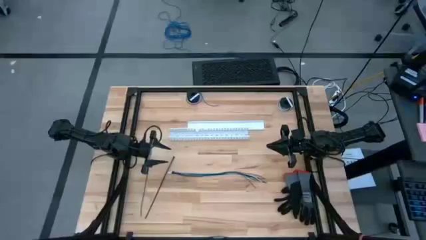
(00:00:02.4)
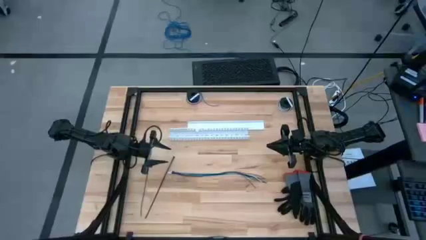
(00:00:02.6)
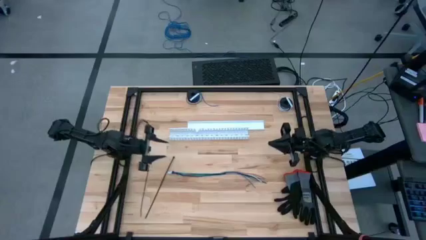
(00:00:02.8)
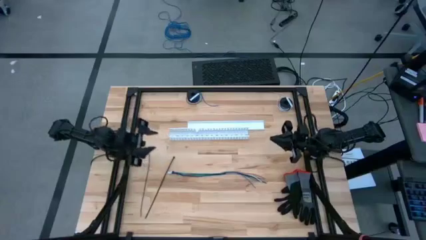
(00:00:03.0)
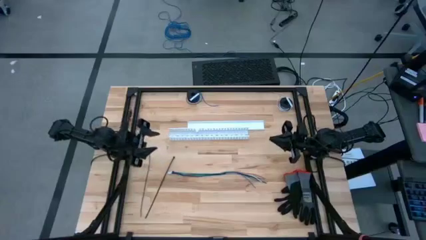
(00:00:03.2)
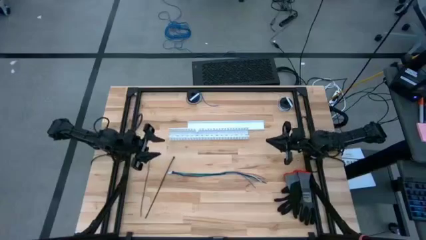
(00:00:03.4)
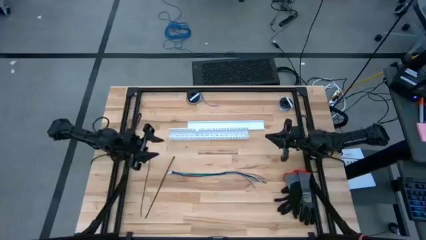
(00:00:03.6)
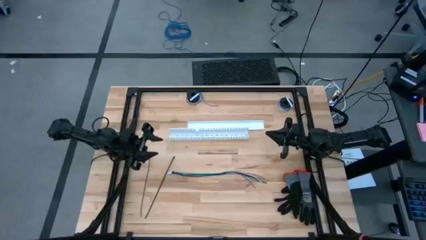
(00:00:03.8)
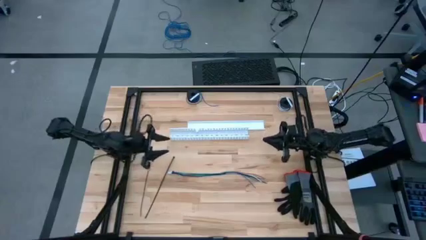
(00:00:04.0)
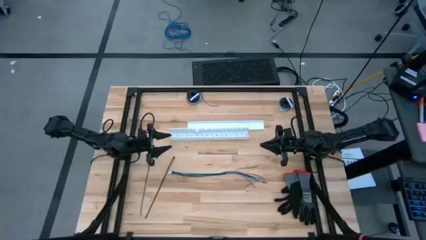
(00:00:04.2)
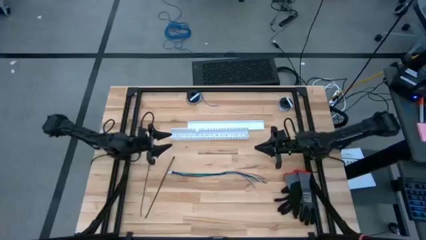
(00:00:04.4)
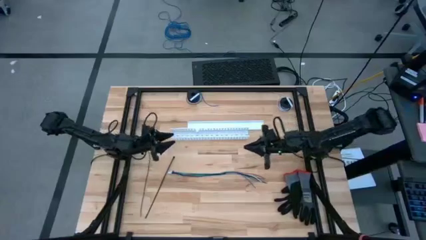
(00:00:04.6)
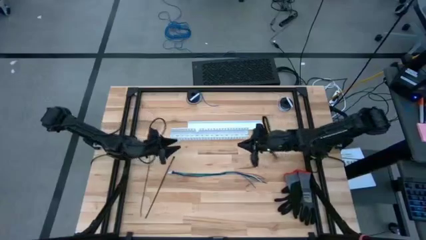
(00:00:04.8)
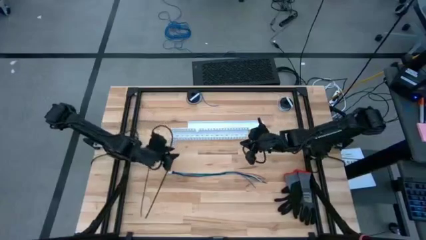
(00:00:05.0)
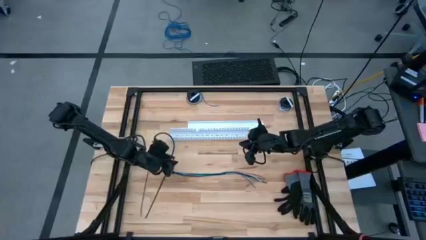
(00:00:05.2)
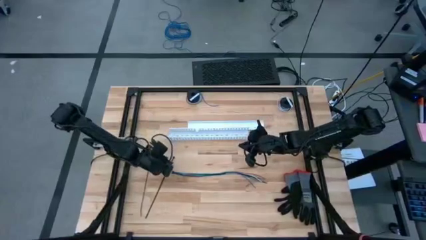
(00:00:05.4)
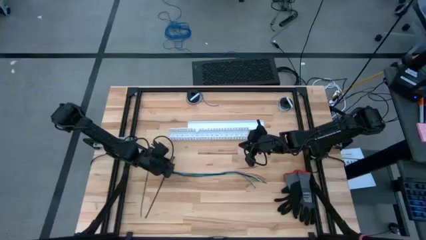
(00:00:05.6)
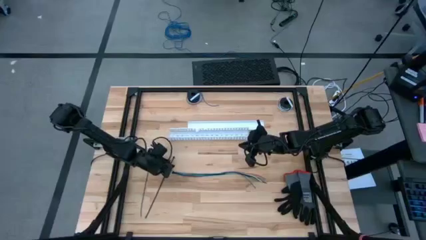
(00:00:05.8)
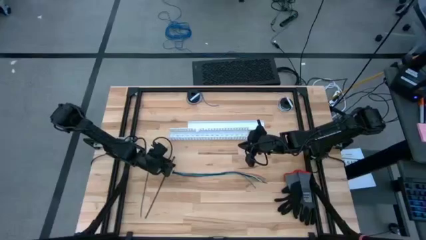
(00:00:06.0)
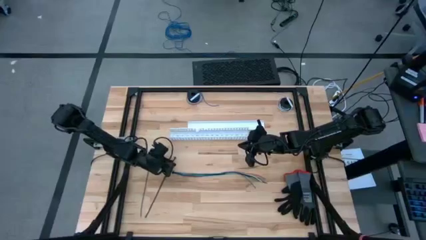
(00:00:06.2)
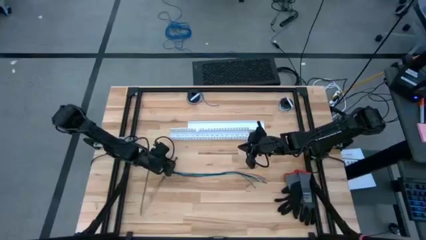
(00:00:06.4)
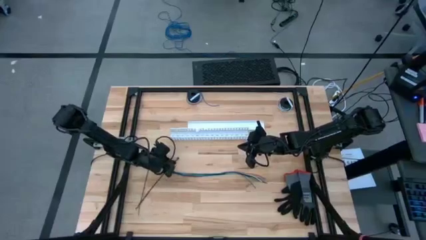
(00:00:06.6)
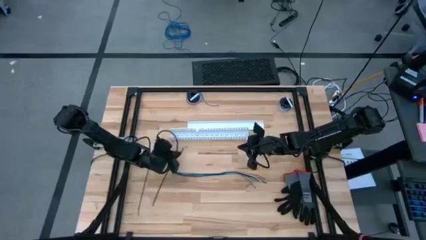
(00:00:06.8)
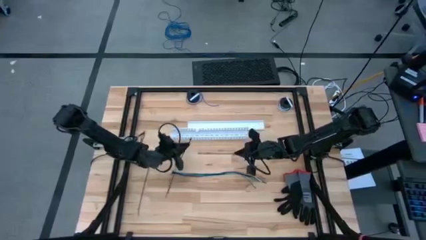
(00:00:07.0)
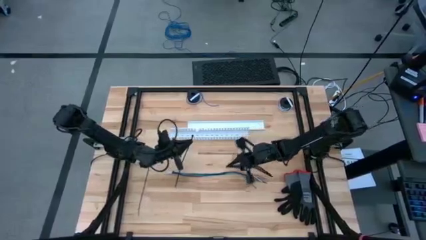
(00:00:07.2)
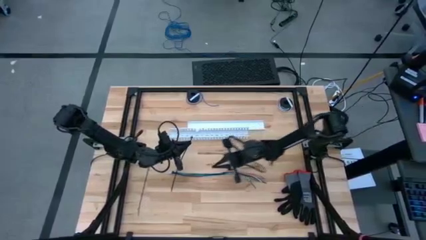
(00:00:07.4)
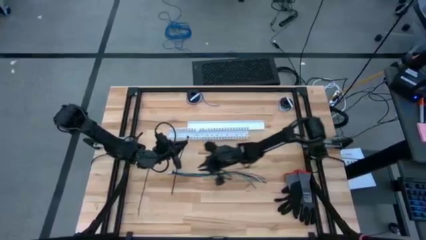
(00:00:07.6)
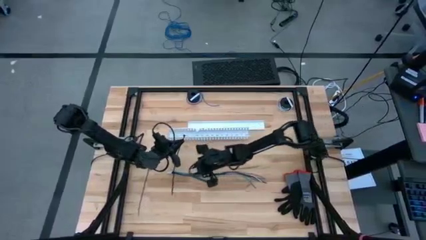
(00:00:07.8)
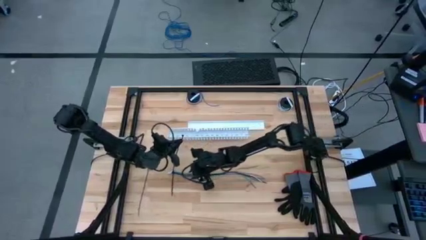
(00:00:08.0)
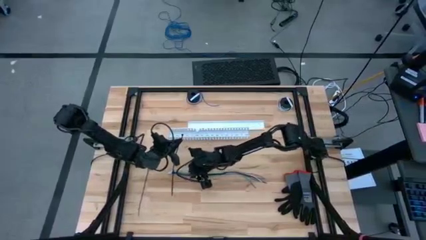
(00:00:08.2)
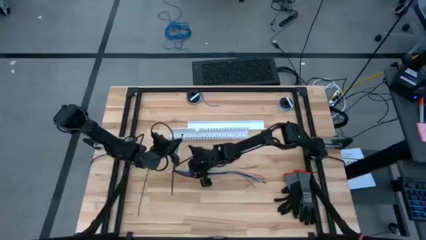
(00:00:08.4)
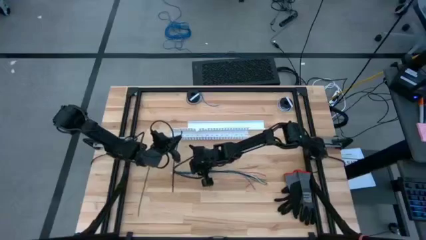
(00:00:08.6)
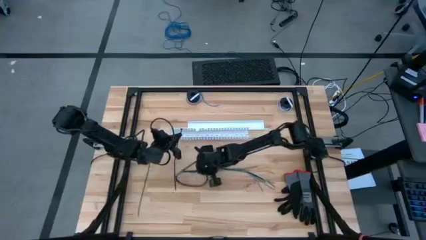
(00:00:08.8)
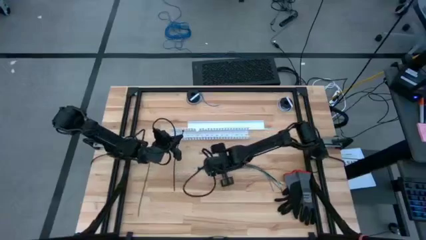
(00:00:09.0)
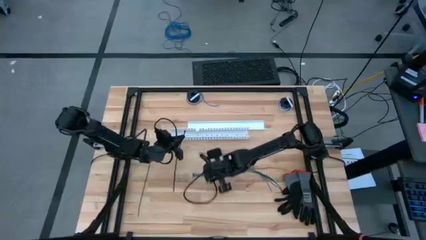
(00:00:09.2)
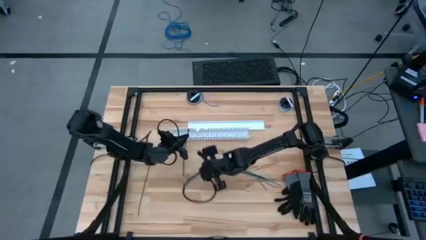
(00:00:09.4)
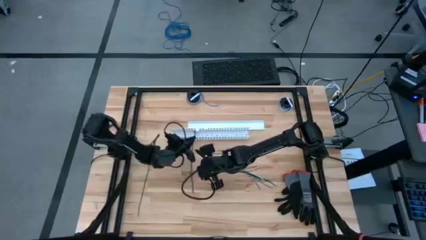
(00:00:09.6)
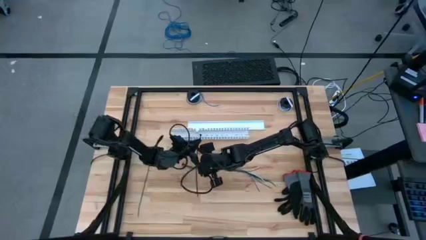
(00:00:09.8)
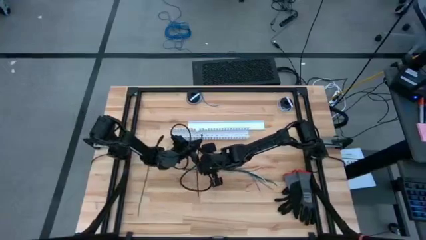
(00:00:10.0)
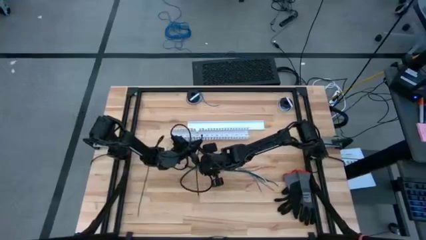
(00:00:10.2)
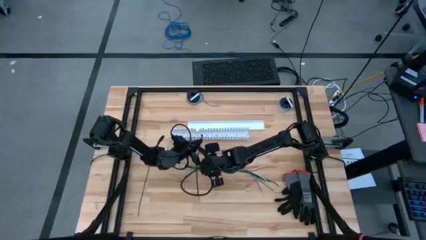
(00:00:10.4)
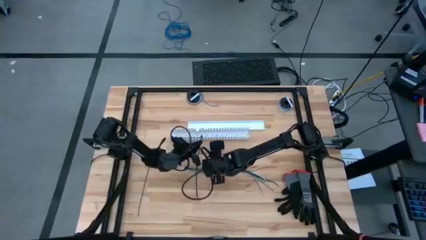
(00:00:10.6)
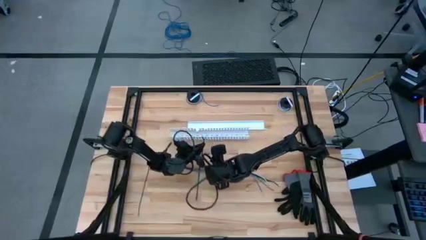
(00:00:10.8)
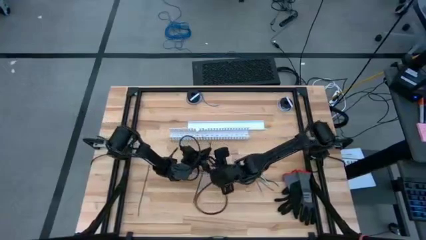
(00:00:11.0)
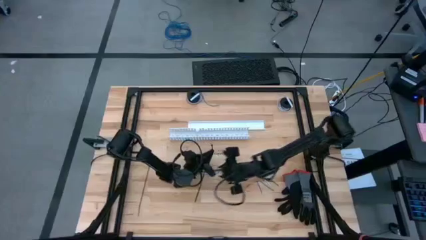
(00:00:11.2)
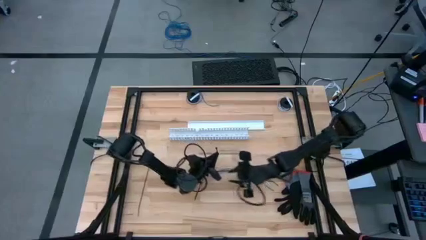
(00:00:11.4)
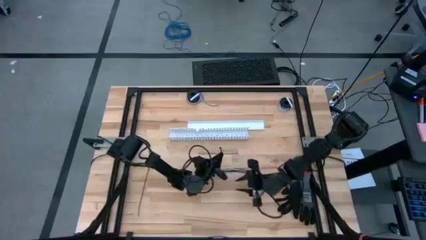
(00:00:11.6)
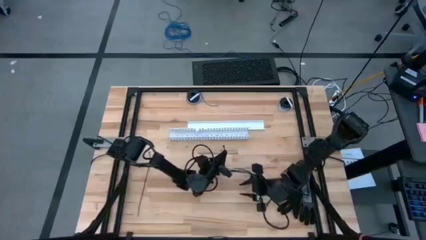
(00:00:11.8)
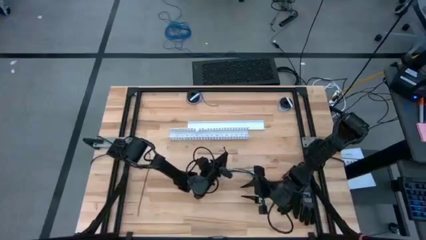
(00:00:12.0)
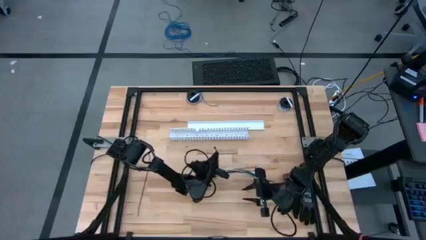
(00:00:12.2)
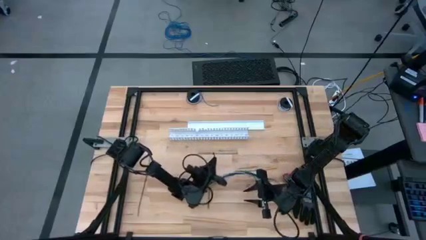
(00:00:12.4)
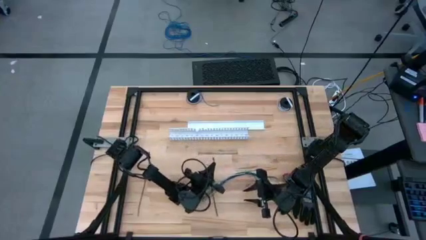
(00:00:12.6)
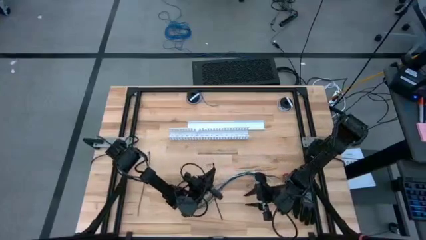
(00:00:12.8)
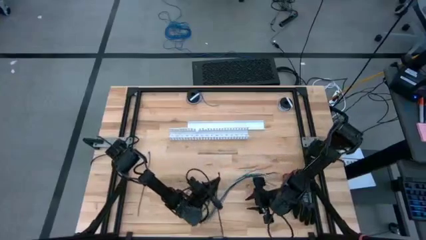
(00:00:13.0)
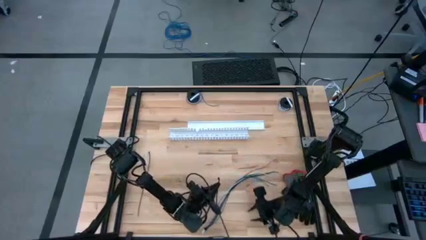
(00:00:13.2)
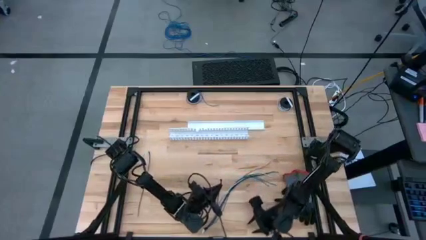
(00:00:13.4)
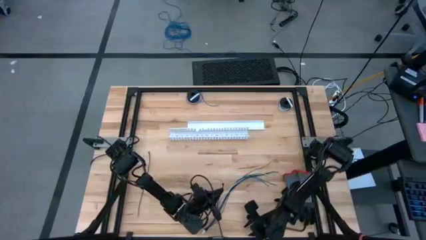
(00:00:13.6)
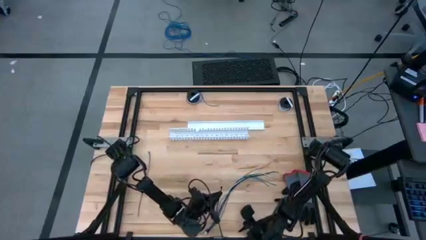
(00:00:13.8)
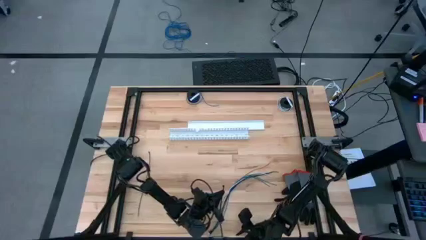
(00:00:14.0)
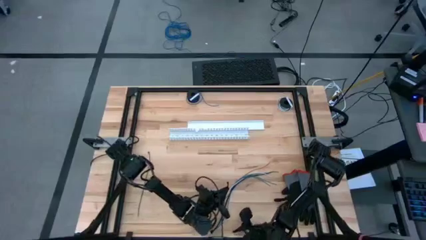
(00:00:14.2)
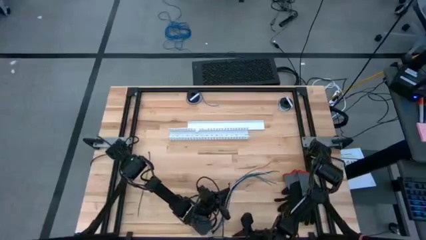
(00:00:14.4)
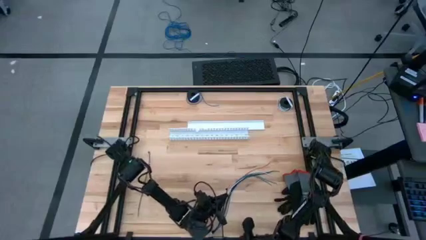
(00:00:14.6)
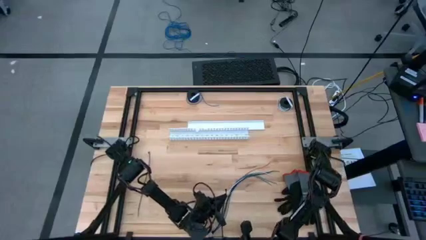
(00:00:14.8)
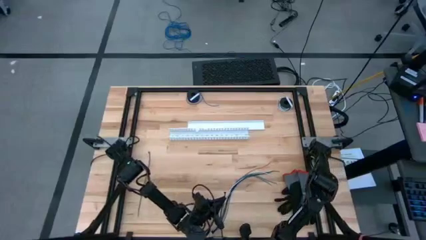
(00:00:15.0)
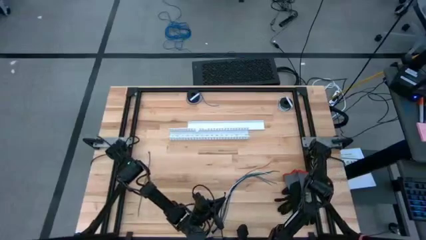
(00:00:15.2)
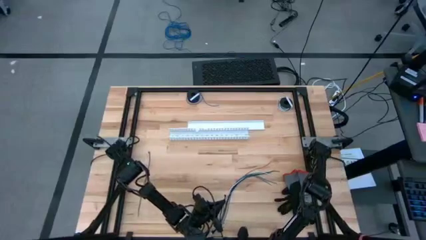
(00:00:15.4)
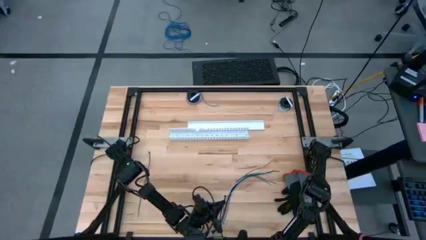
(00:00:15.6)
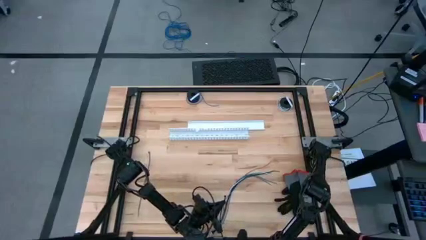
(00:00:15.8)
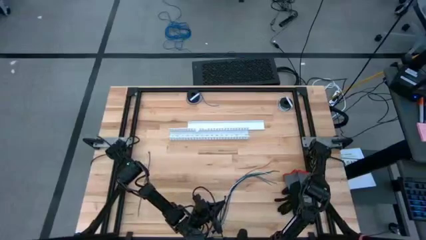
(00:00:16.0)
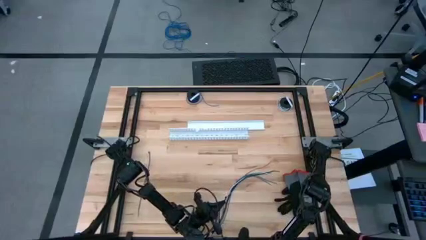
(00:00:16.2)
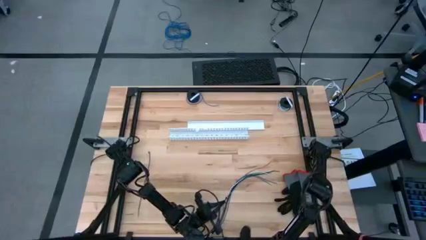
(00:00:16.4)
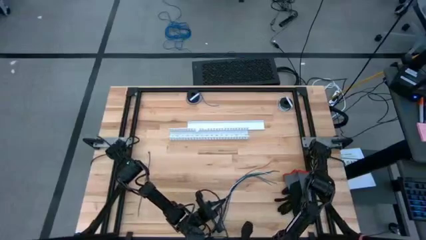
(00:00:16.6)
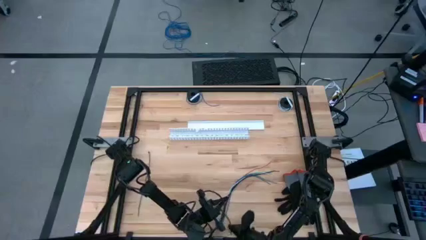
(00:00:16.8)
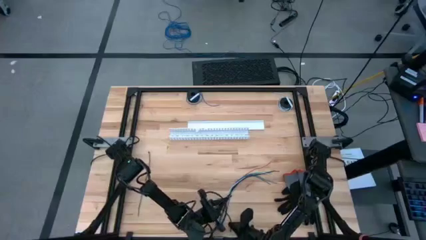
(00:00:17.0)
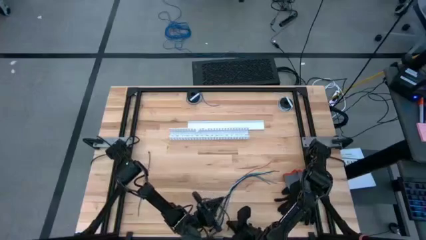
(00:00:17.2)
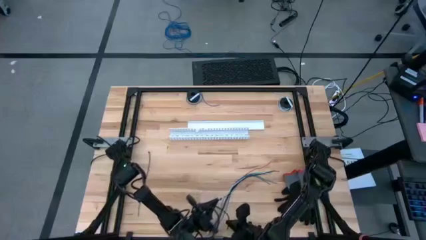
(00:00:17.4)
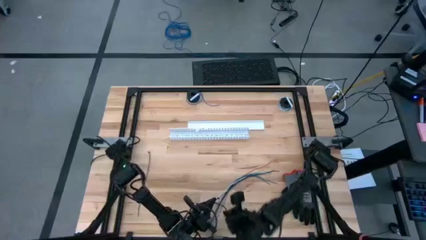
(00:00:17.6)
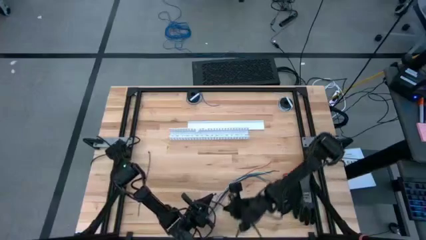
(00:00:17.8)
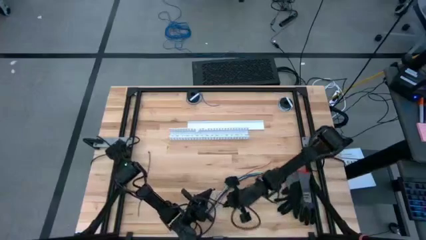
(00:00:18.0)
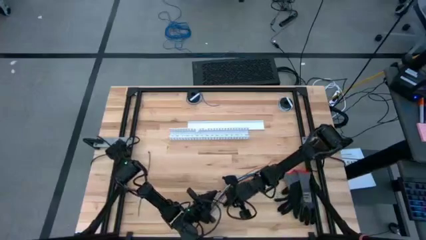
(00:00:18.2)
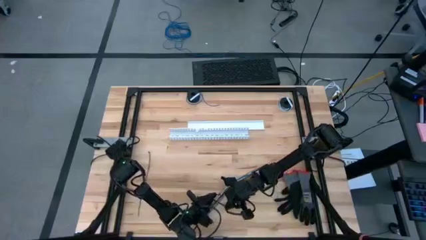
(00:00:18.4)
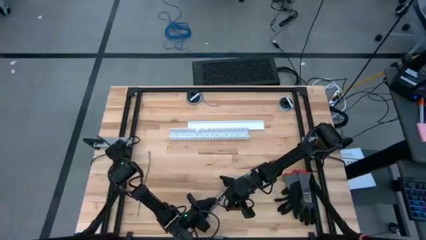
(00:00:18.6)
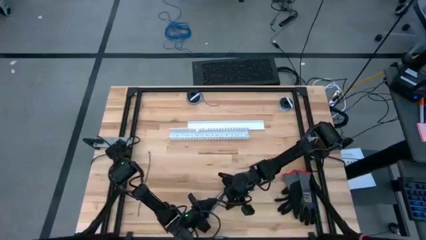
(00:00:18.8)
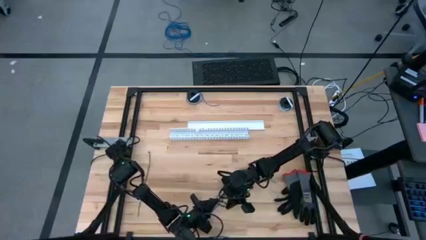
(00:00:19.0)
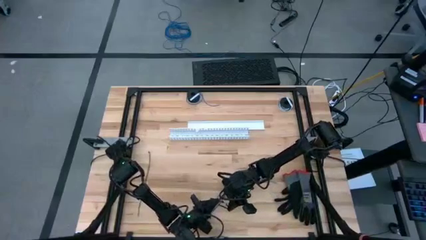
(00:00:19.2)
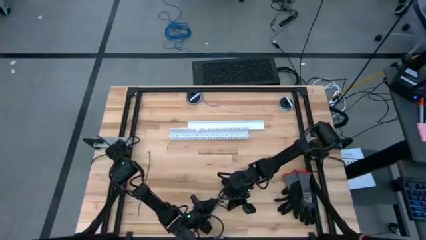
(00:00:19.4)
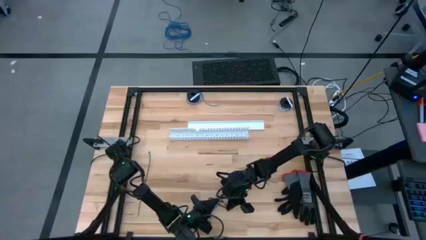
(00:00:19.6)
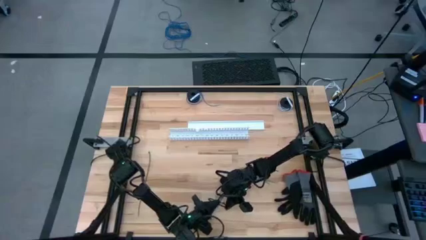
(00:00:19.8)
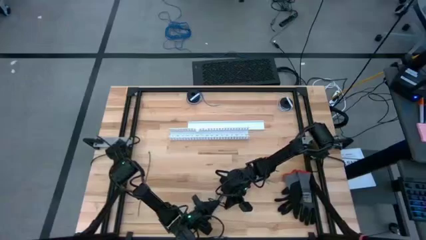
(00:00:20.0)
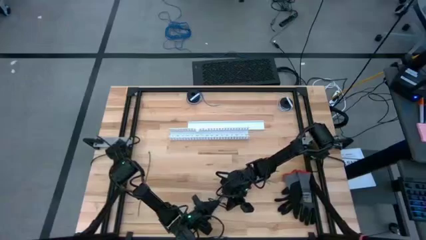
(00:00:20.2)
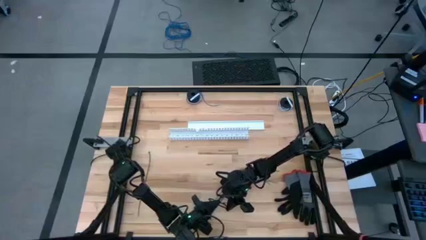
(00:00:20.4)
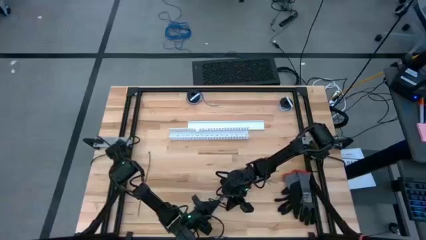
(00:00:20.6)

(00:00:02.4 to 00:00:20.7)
Task: Ziptie cables
Assemble the cable wires with the together using a zip tie
